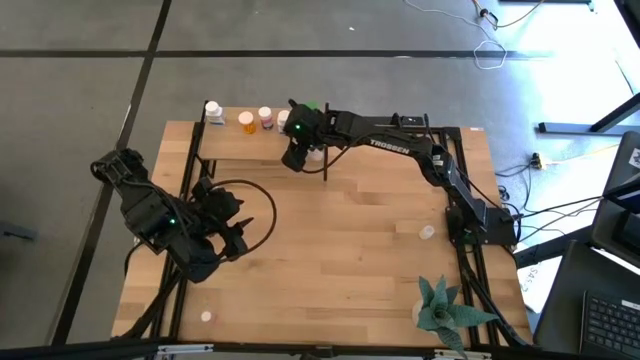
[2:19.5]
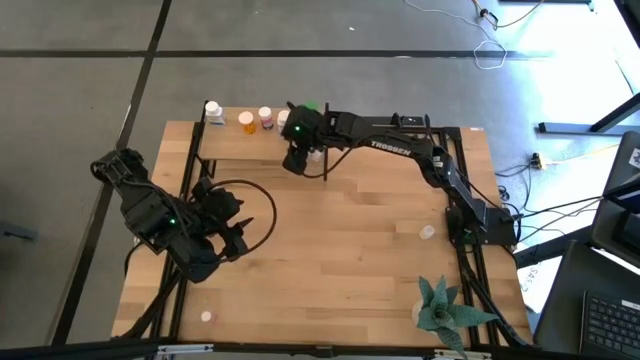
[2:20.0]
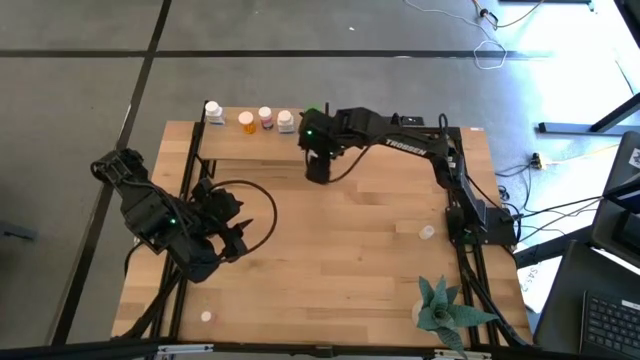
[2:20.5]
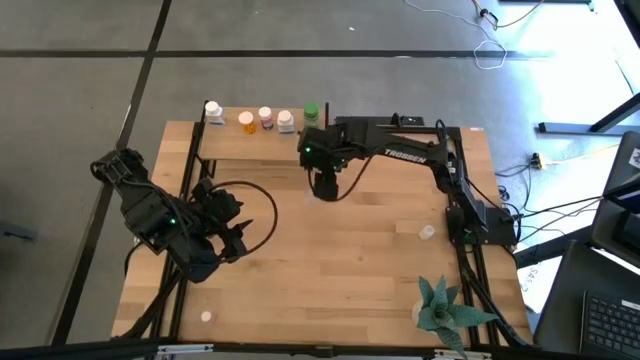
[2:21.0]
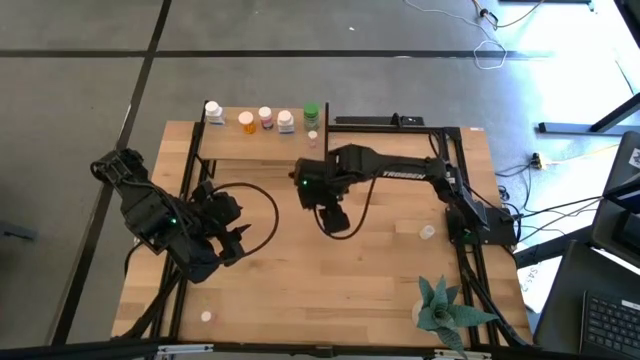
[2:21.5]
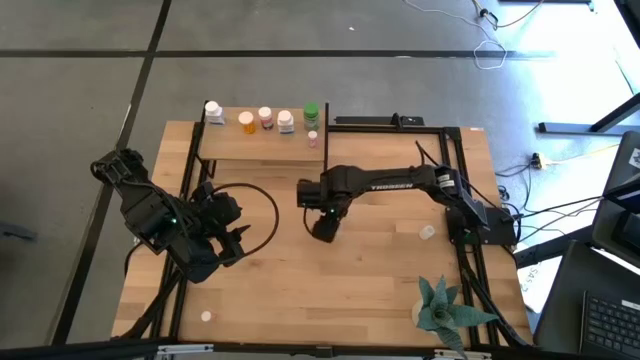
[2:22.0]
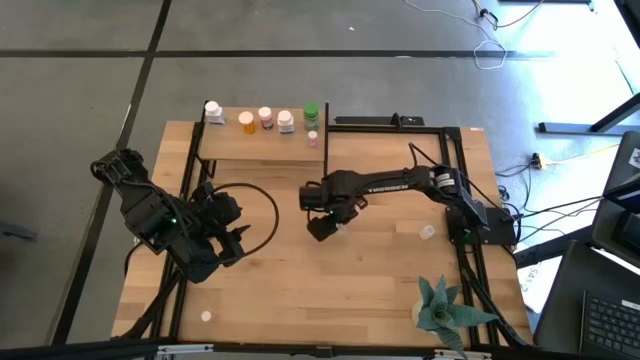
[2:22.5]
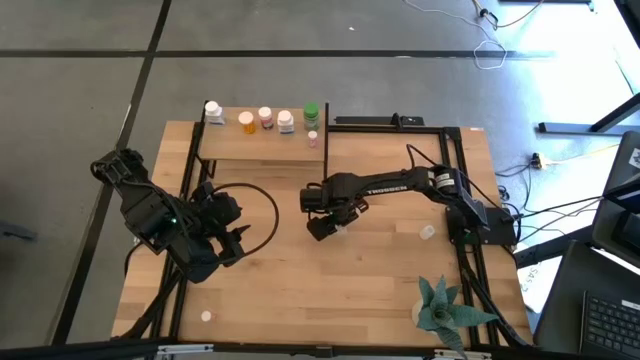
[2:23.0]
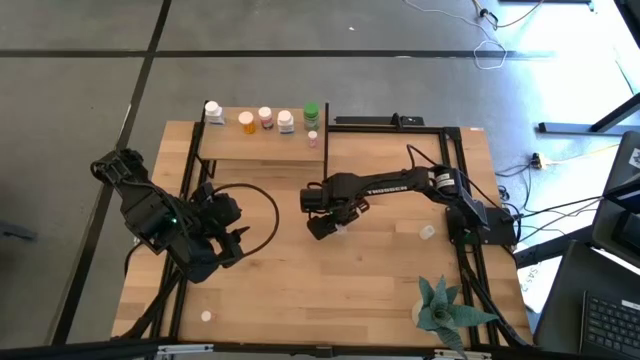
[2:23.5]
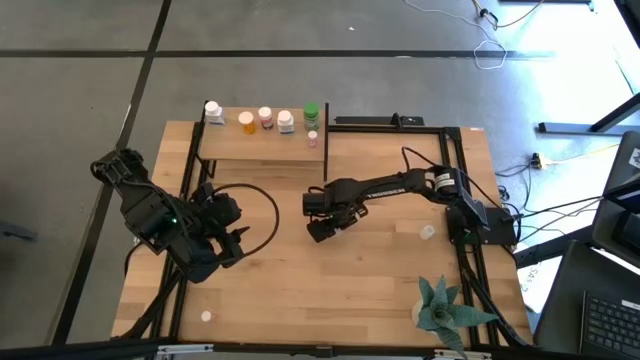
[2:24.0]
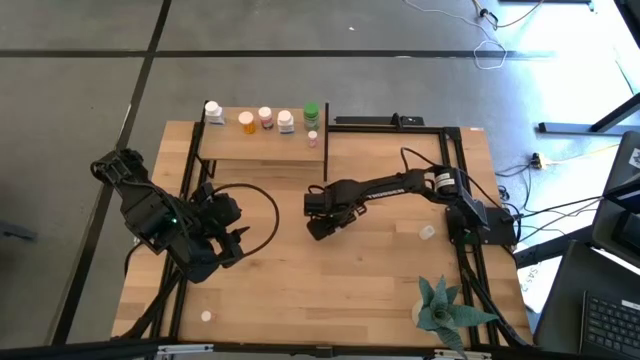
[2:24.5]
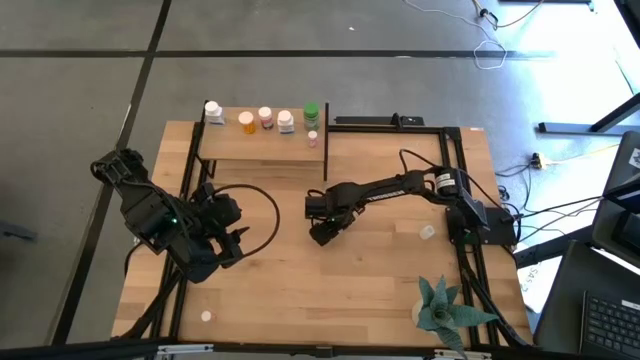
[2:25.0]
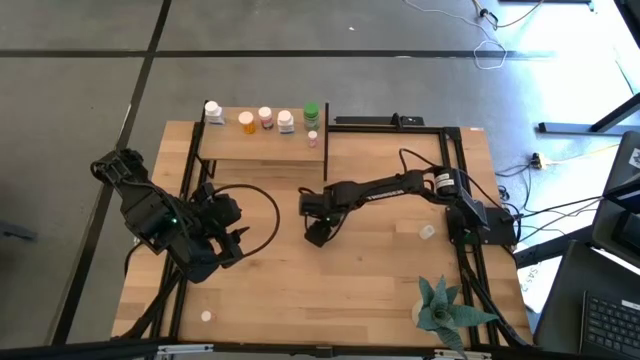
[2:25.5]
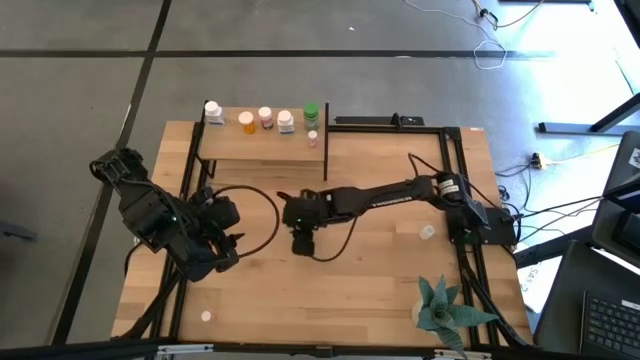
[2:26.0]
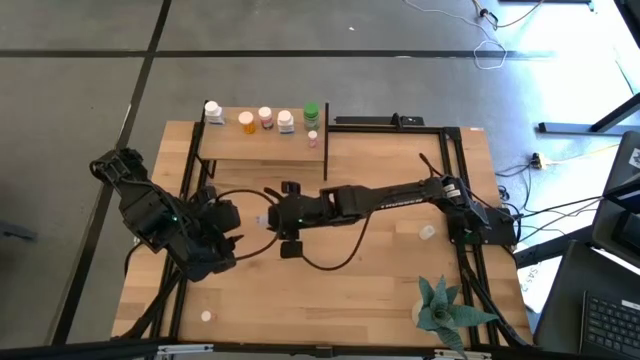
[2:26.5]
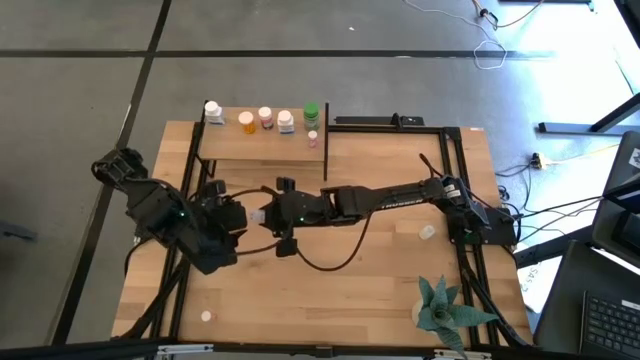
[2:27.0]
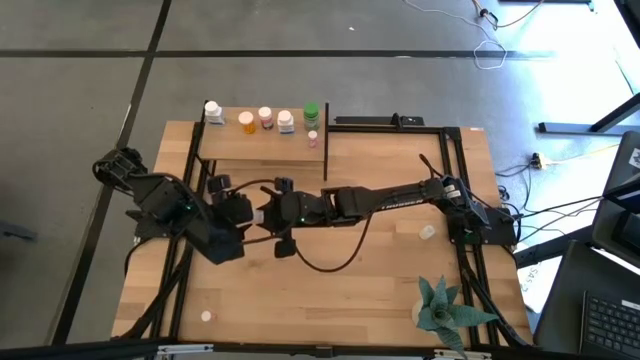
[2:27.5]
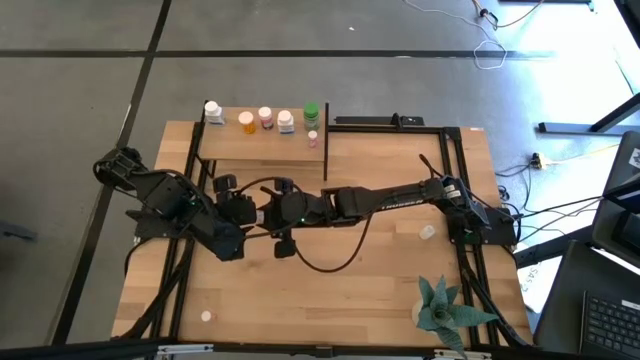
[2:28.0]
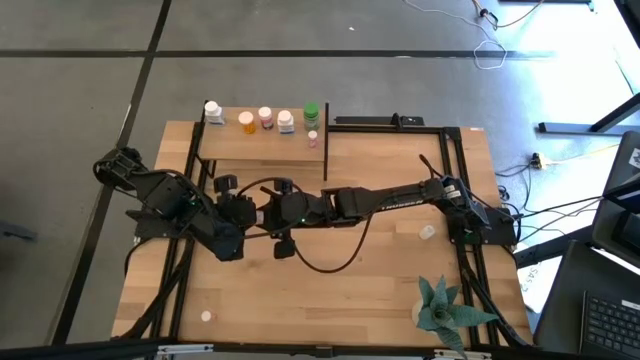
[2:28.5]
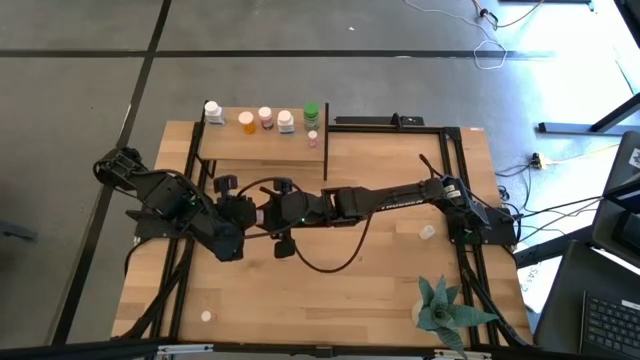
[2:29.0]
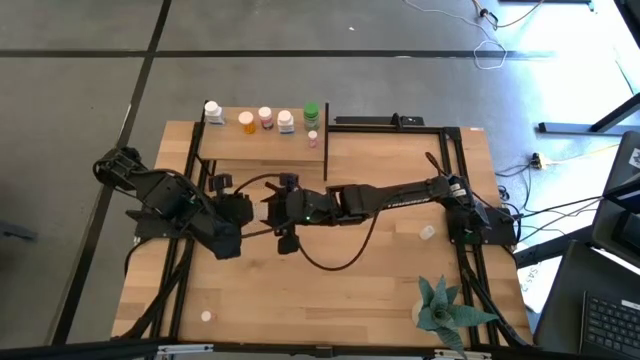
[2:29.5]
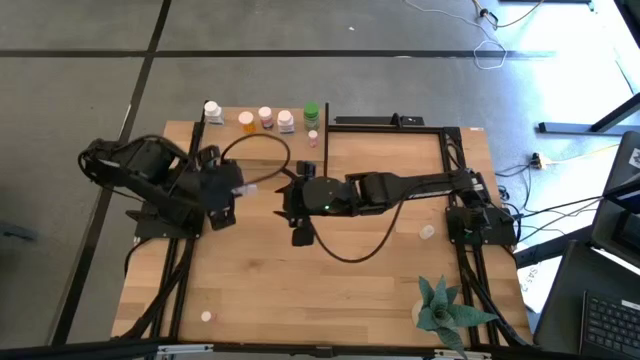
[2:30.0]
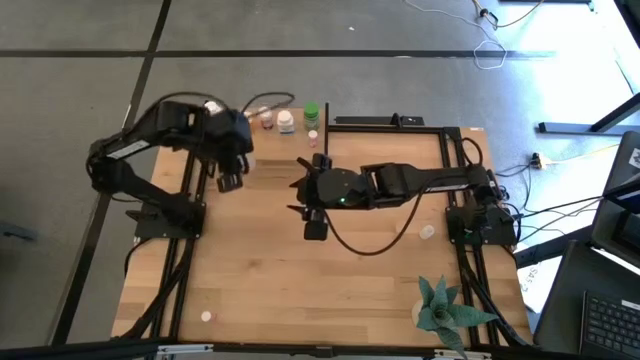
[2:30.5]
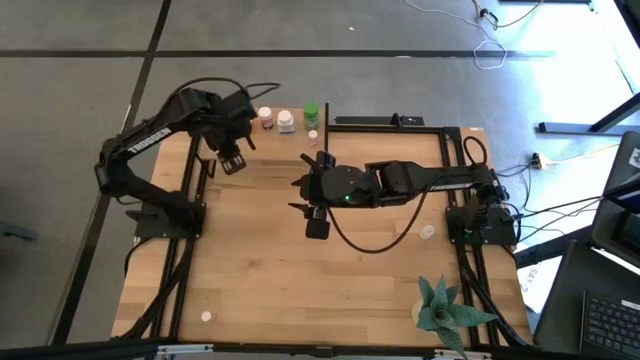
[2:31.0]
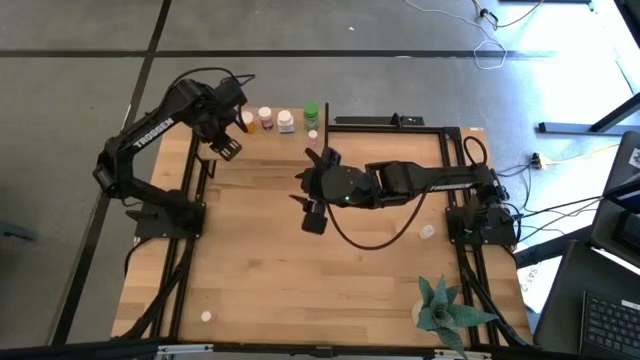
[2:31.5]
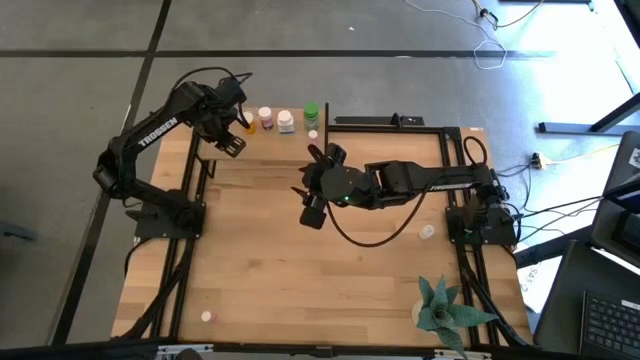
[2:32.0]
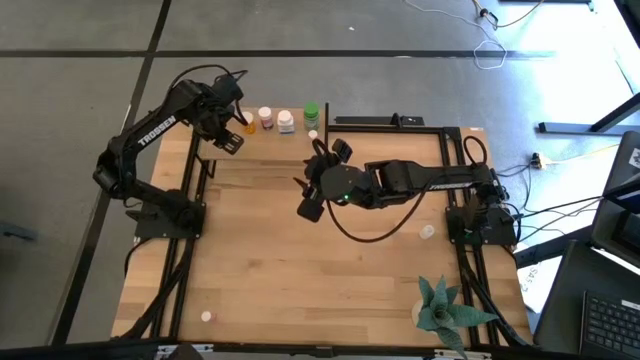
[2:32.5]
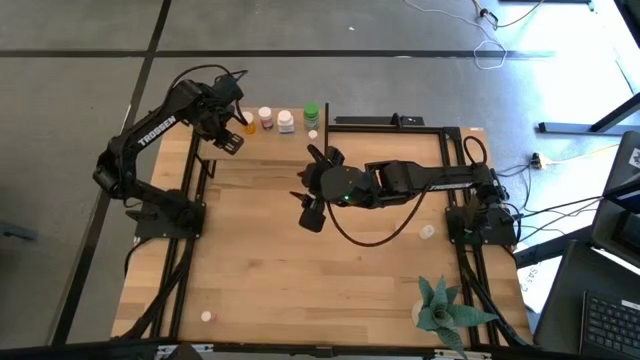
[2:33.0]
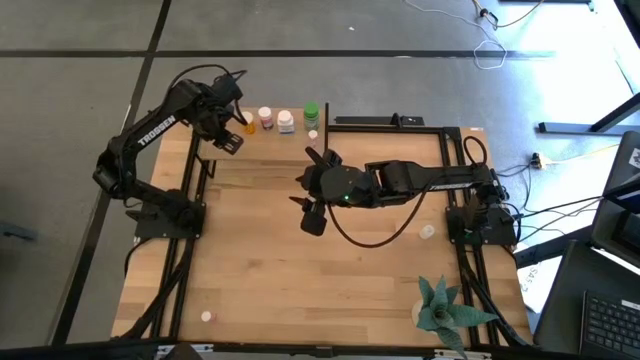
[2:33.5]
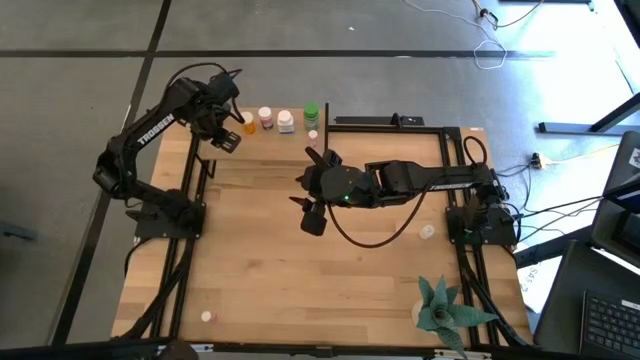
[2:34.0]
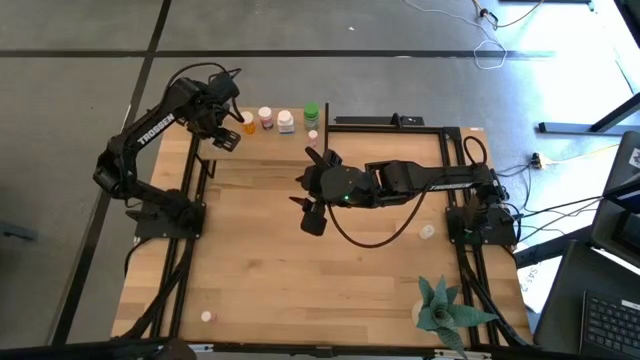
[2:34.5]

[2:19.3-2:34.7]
Task: Pick and place medicine bottles onto shelf by color
Put the bottom transparent pill bottle on the shelf

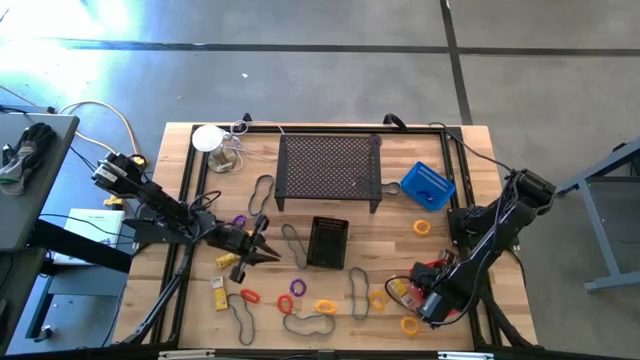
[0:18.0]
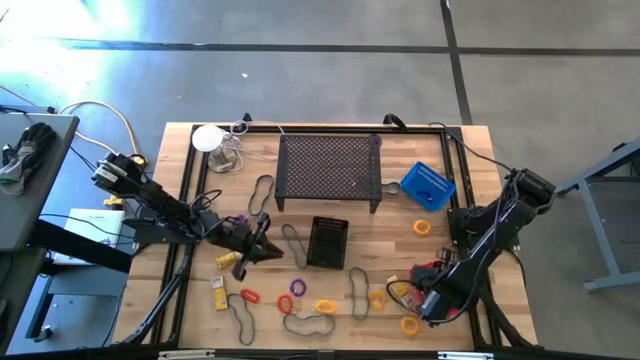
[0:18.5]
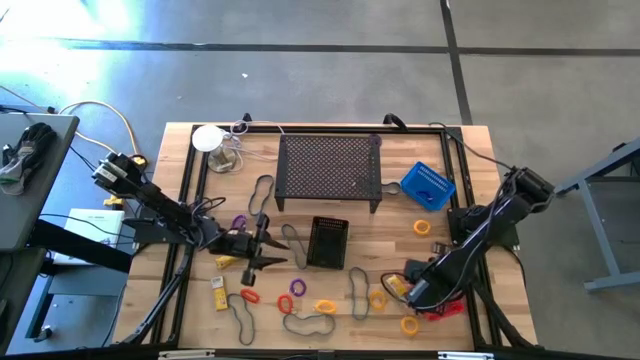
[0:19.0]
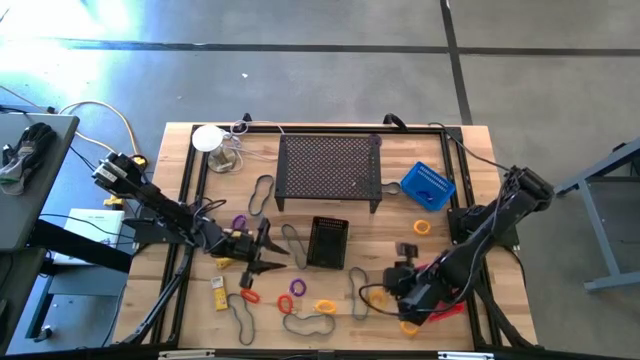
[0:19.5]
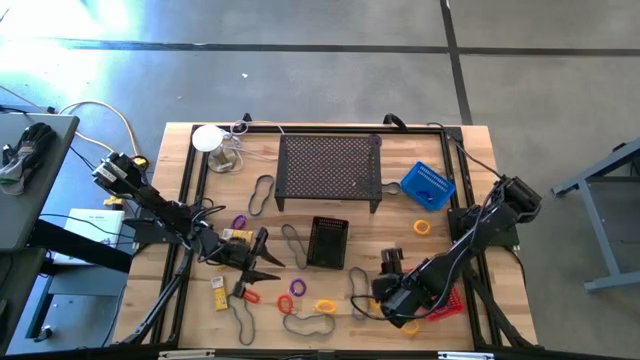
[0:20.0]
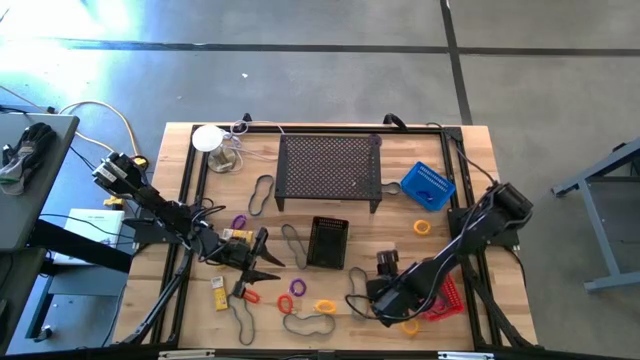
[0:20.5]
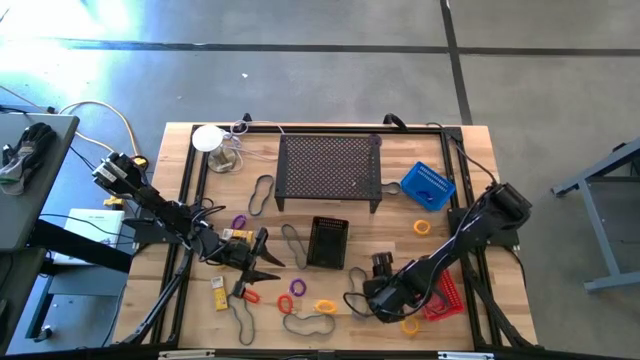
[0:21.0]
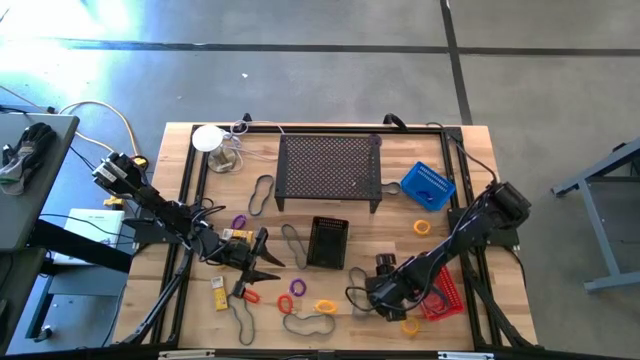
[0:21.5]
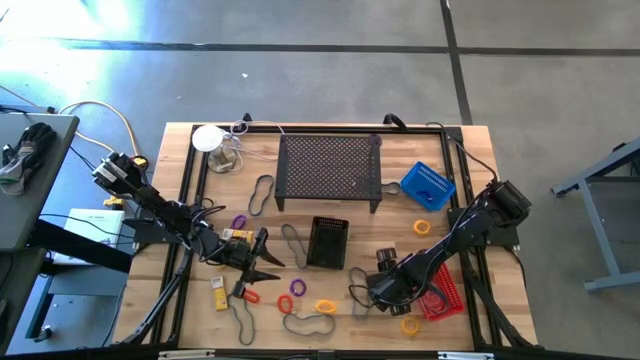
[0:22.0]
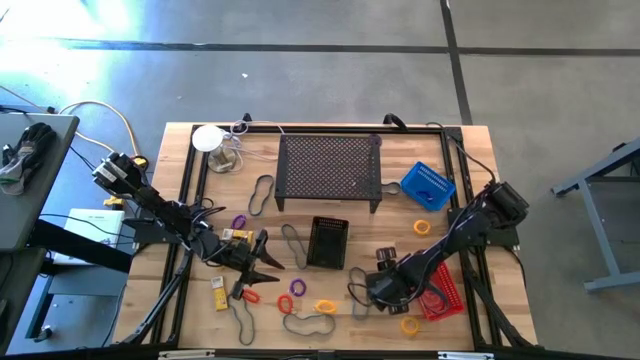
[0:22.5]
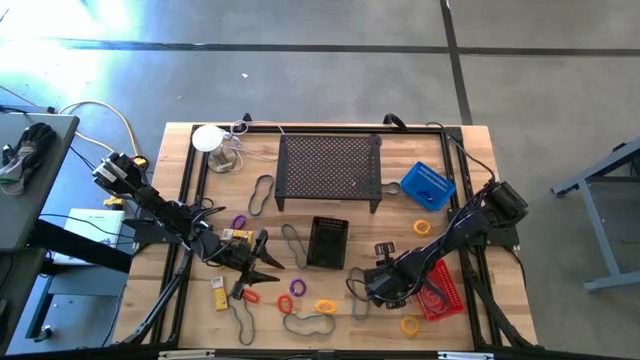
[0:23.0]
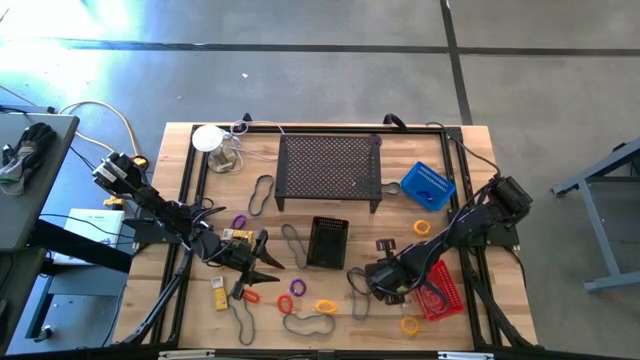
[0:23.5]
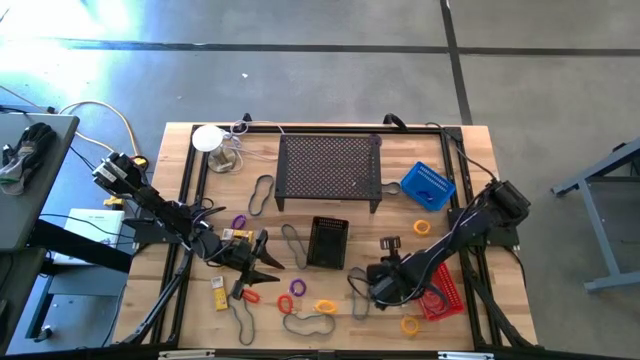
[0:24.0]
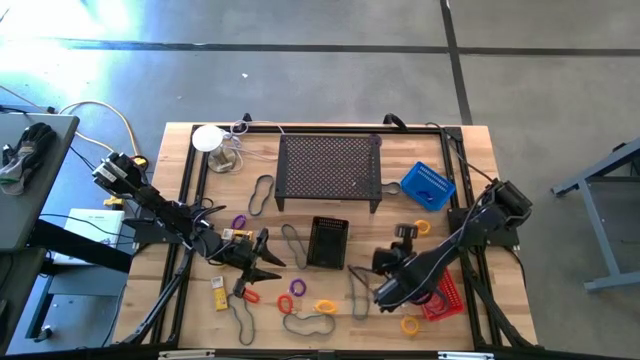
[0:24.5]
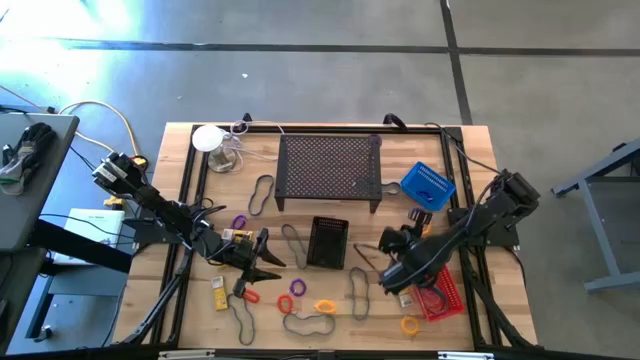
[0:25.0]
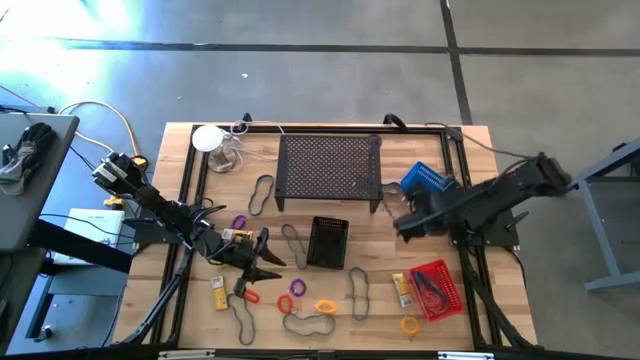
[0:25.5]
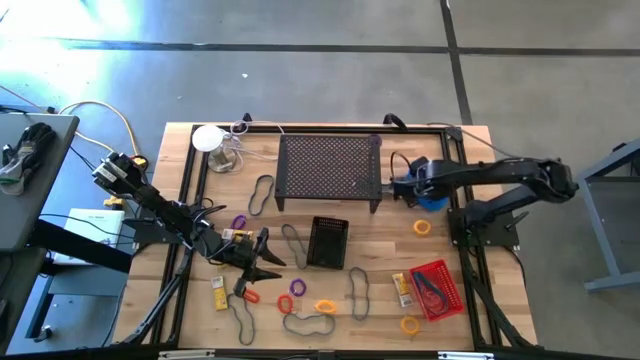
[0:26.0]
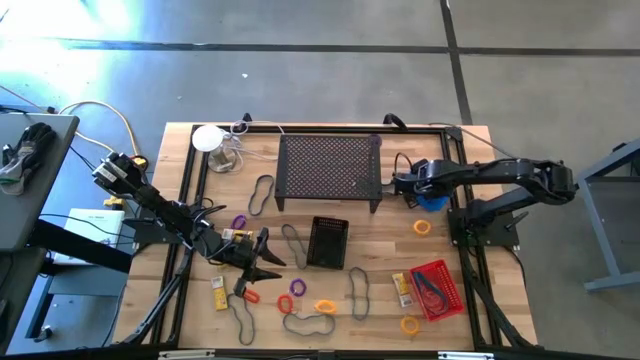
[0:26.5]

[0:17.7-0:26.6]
Task: Pick & Place Office Desk Supplies
Put the yellow spring keychain into the blue bin
